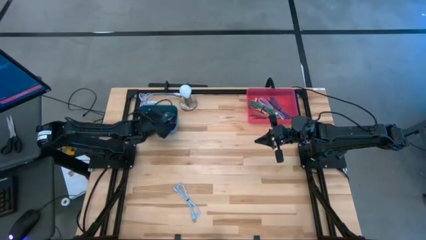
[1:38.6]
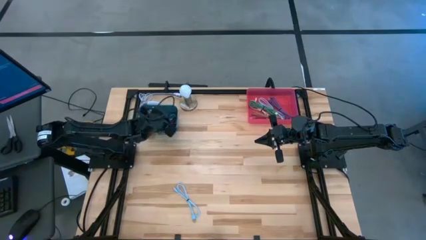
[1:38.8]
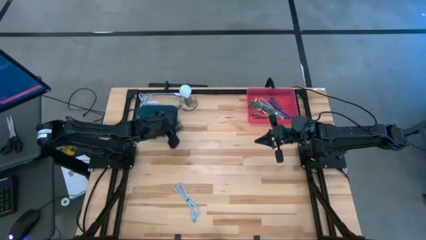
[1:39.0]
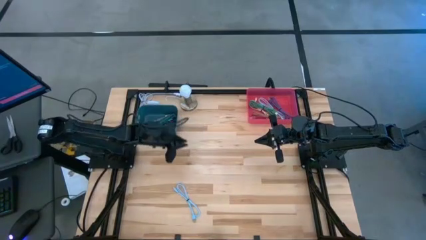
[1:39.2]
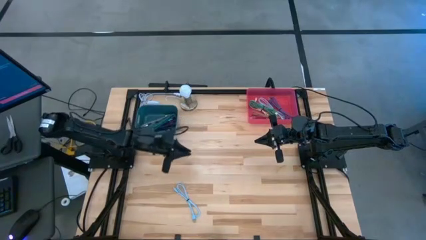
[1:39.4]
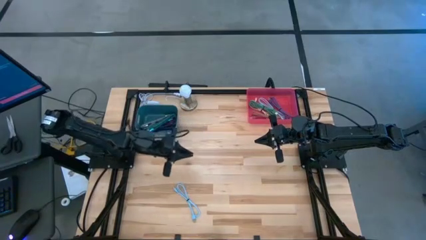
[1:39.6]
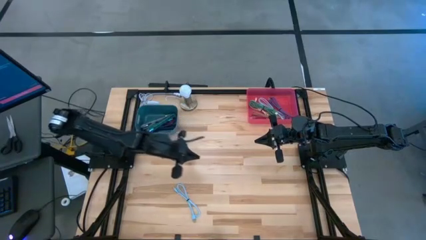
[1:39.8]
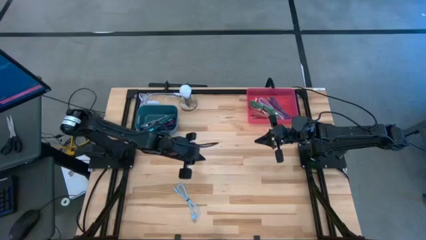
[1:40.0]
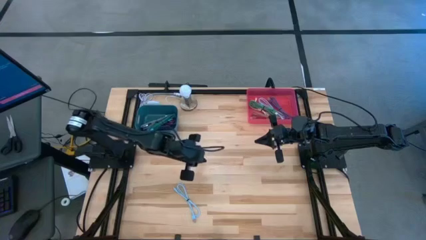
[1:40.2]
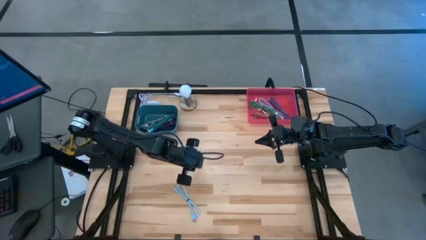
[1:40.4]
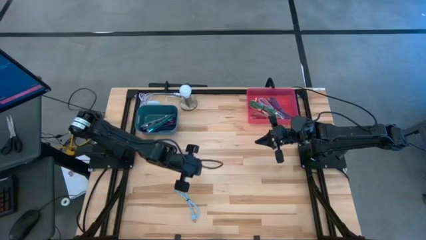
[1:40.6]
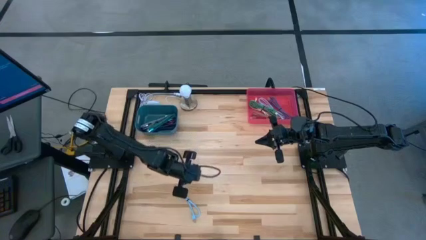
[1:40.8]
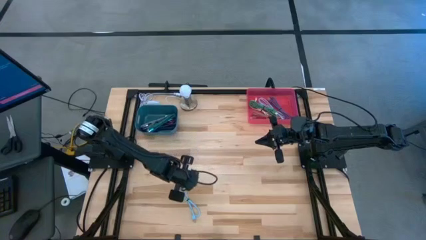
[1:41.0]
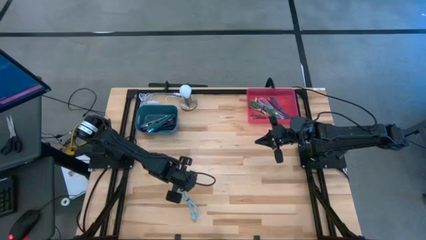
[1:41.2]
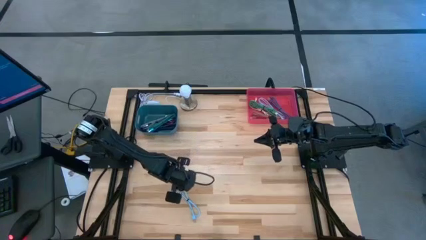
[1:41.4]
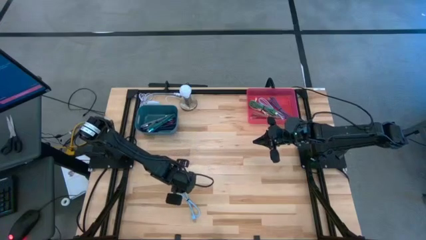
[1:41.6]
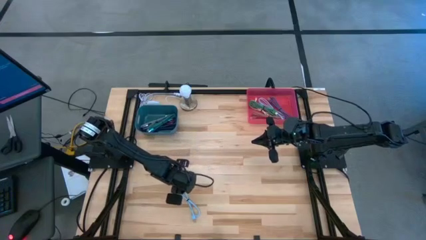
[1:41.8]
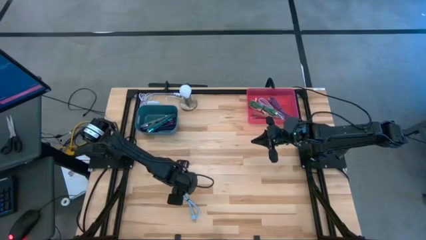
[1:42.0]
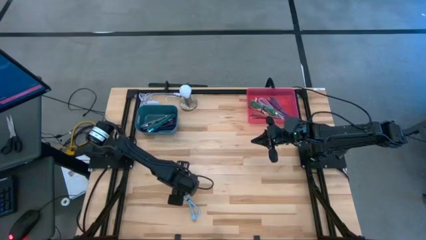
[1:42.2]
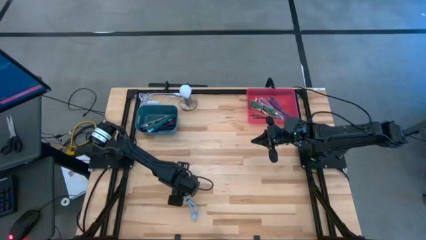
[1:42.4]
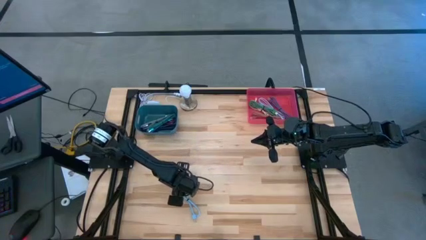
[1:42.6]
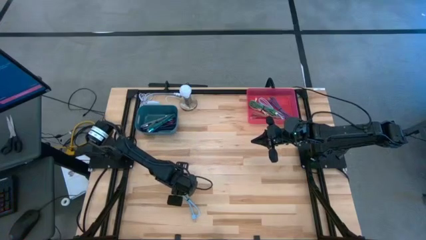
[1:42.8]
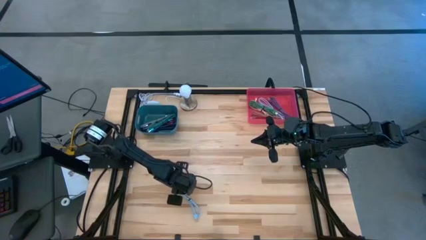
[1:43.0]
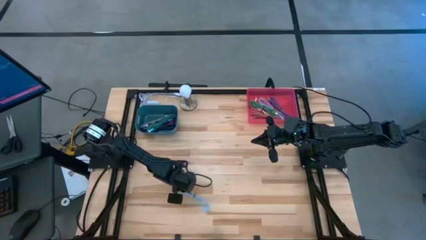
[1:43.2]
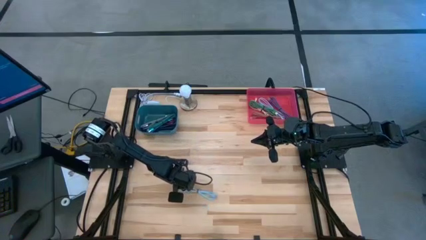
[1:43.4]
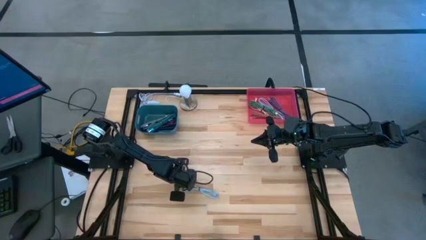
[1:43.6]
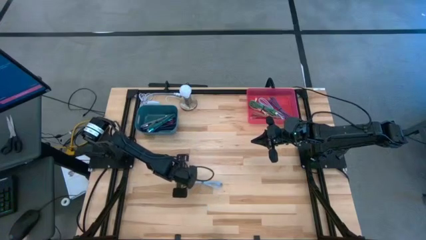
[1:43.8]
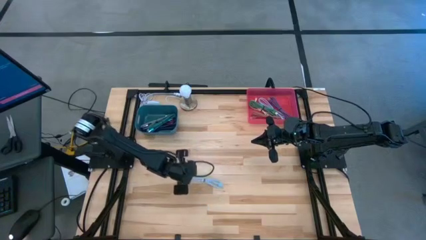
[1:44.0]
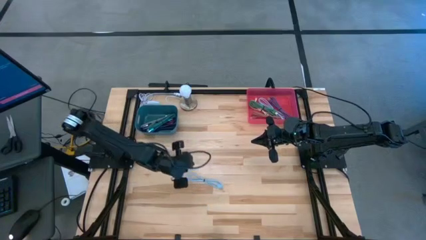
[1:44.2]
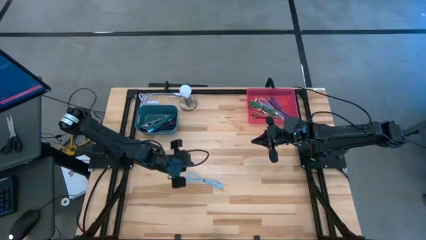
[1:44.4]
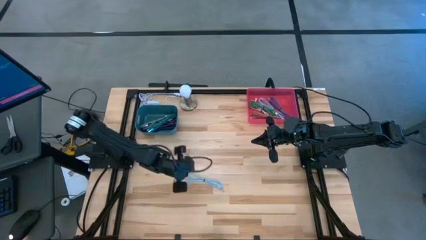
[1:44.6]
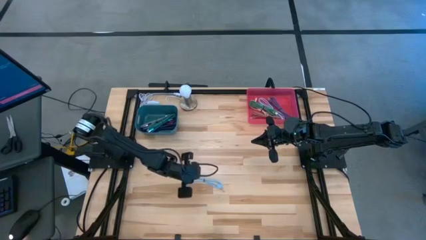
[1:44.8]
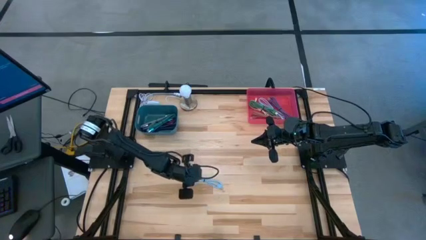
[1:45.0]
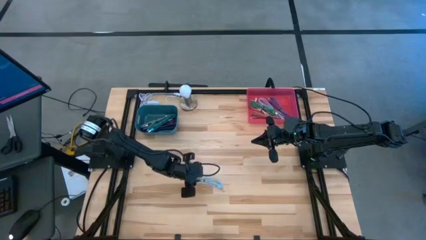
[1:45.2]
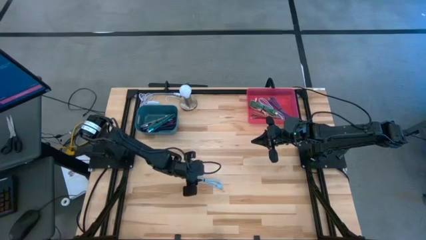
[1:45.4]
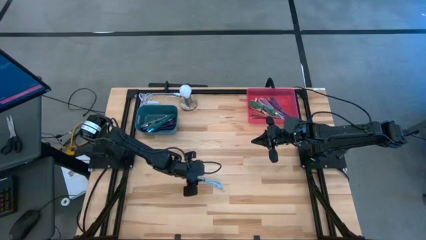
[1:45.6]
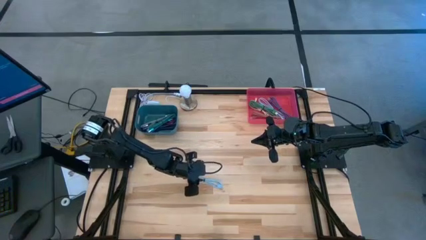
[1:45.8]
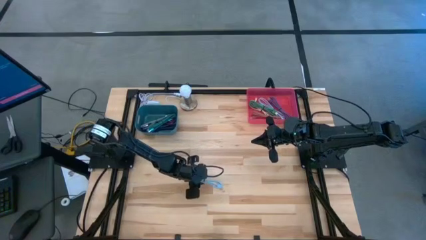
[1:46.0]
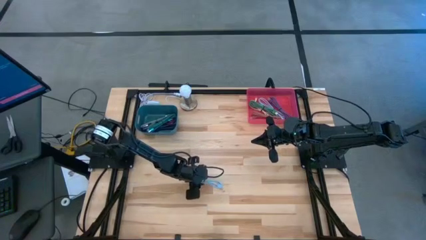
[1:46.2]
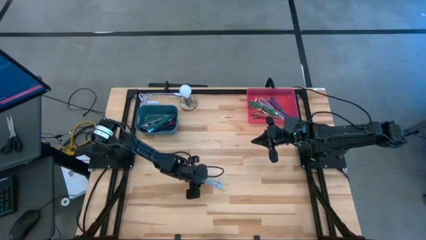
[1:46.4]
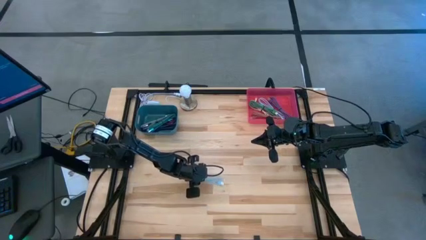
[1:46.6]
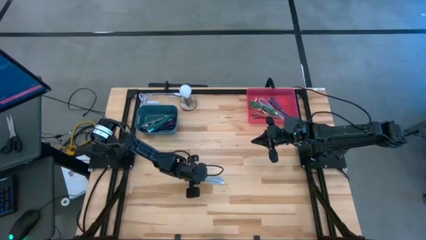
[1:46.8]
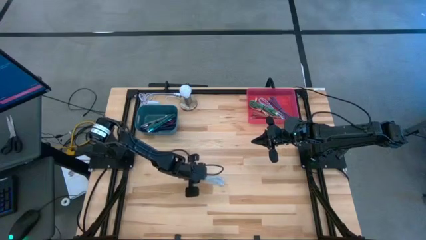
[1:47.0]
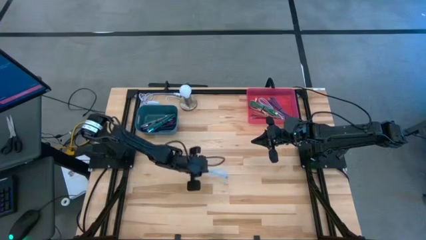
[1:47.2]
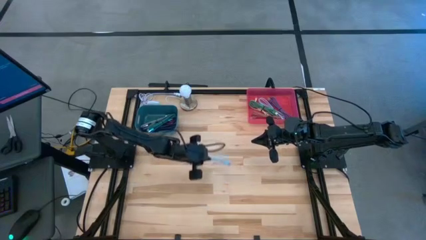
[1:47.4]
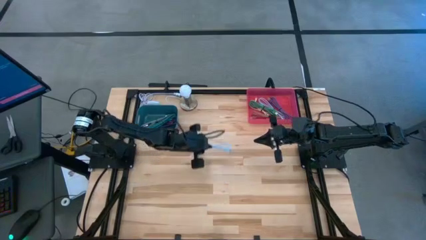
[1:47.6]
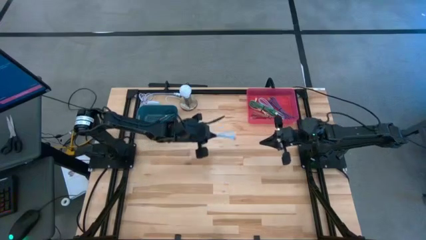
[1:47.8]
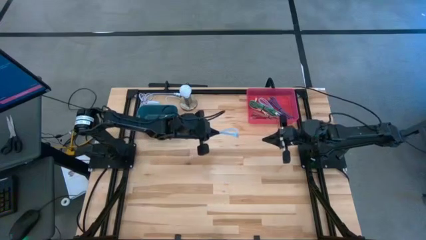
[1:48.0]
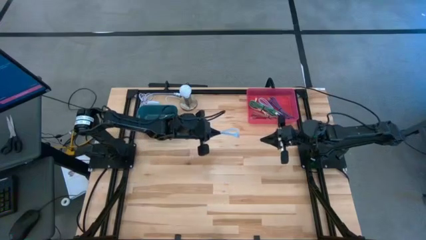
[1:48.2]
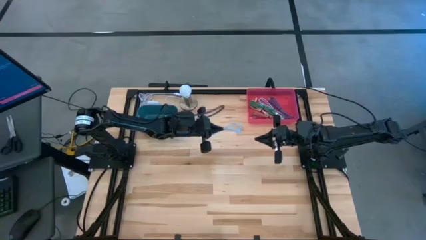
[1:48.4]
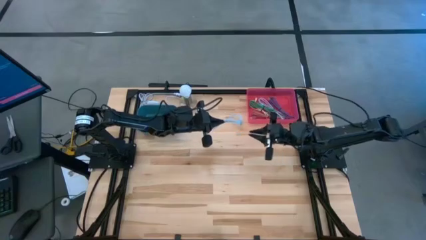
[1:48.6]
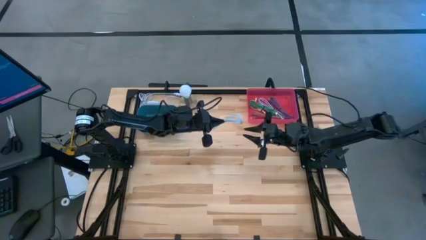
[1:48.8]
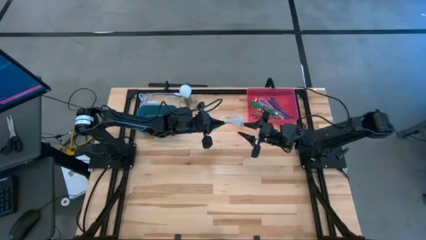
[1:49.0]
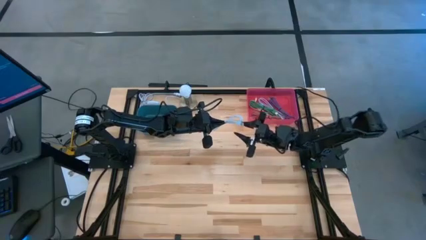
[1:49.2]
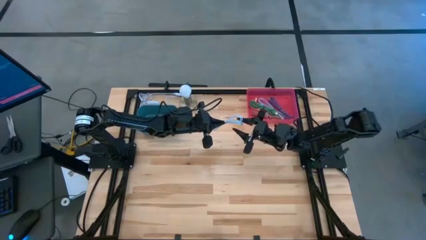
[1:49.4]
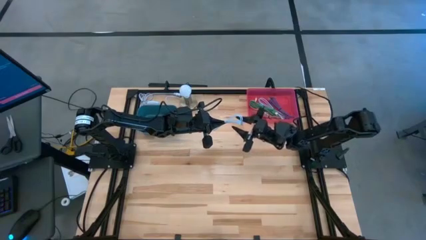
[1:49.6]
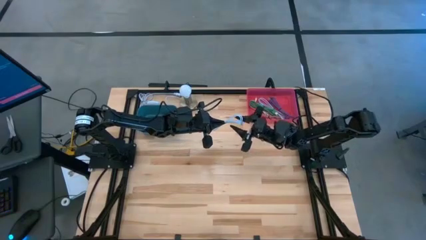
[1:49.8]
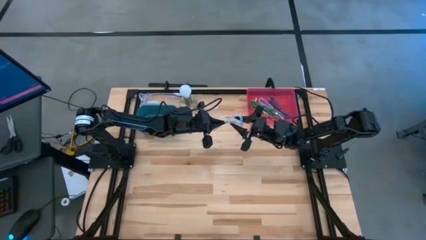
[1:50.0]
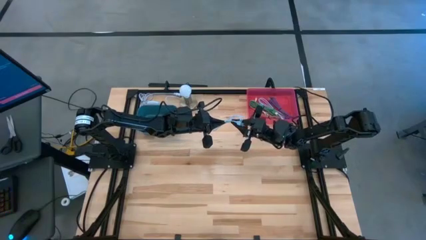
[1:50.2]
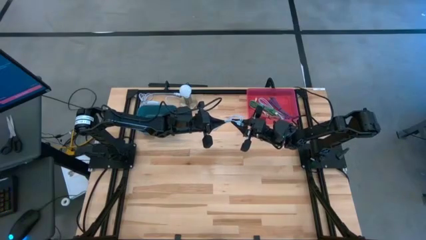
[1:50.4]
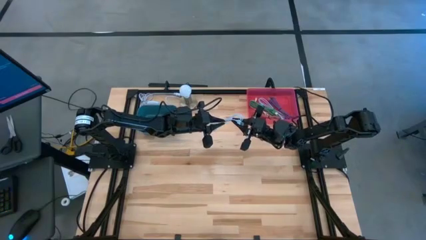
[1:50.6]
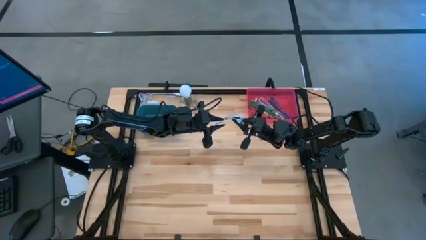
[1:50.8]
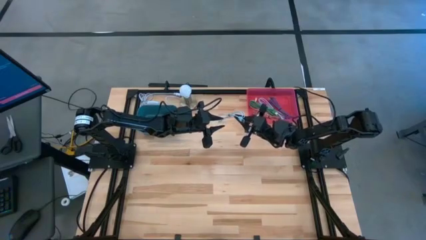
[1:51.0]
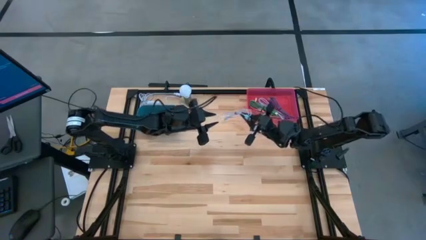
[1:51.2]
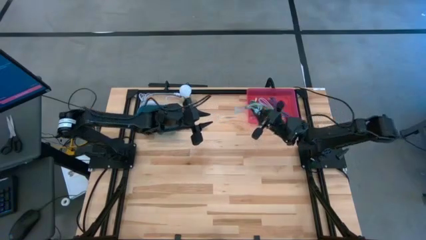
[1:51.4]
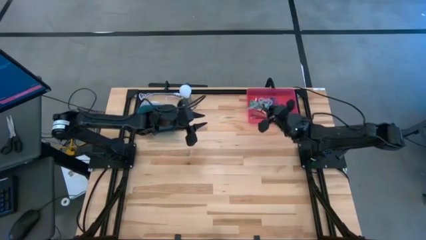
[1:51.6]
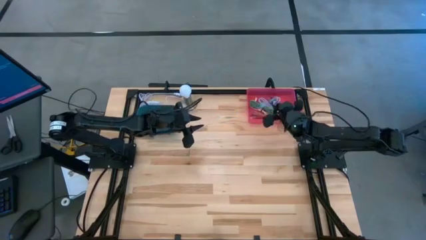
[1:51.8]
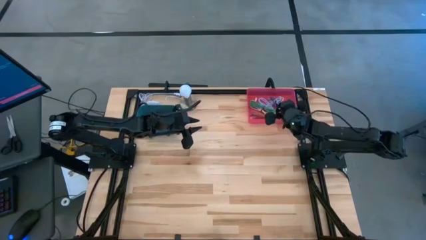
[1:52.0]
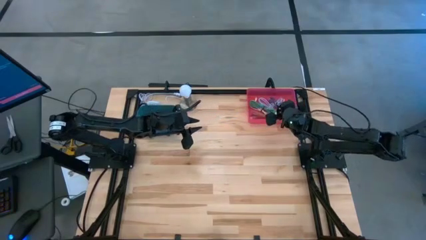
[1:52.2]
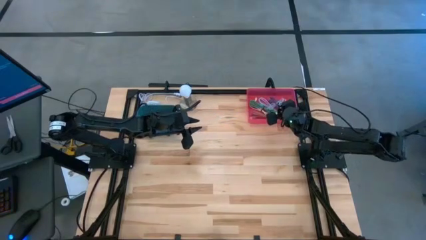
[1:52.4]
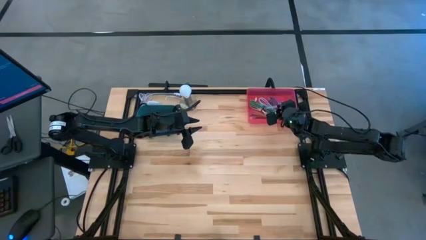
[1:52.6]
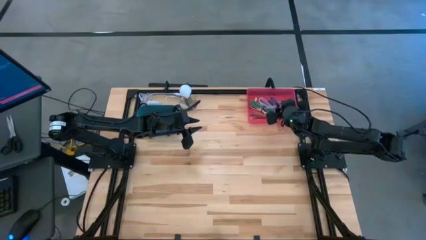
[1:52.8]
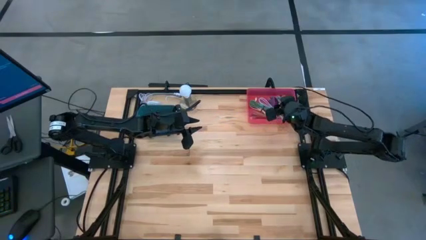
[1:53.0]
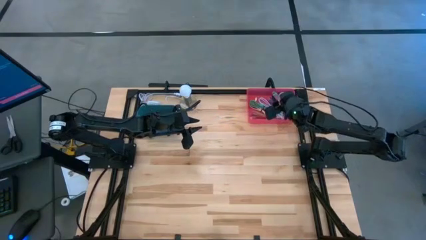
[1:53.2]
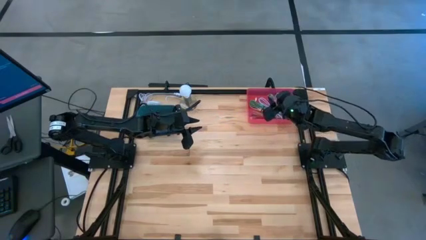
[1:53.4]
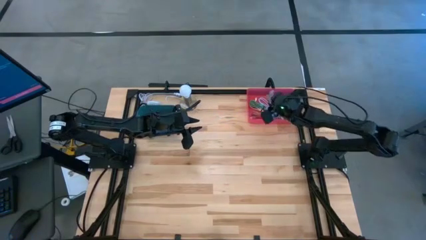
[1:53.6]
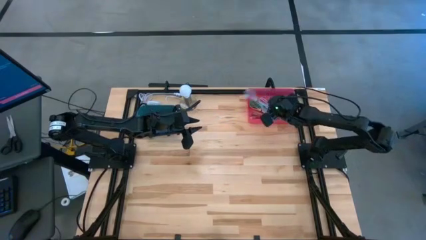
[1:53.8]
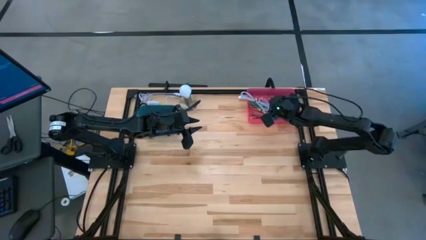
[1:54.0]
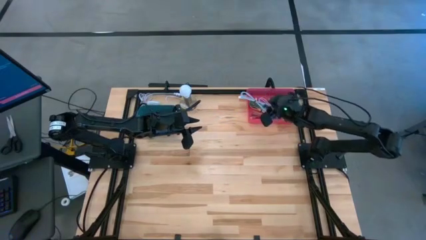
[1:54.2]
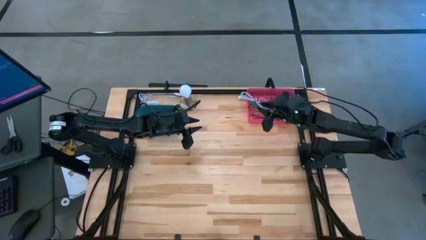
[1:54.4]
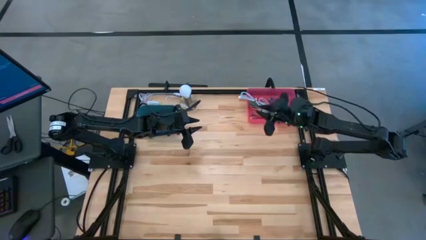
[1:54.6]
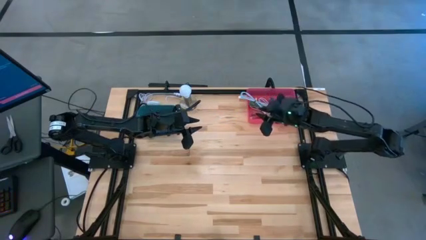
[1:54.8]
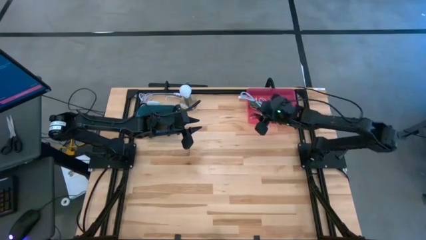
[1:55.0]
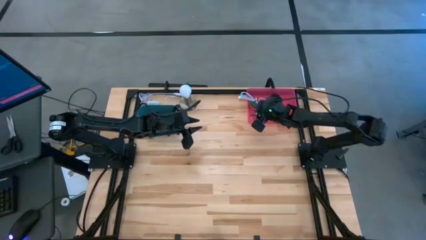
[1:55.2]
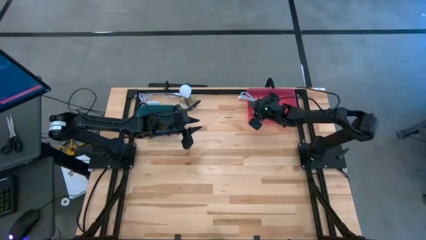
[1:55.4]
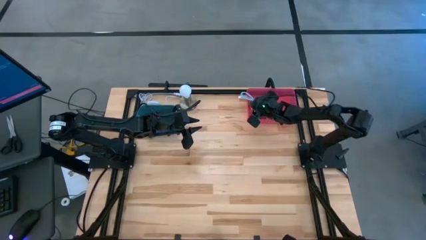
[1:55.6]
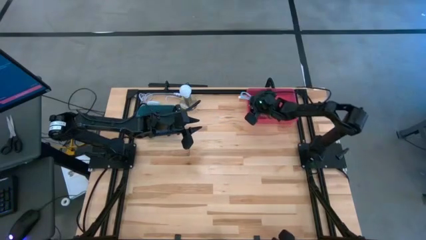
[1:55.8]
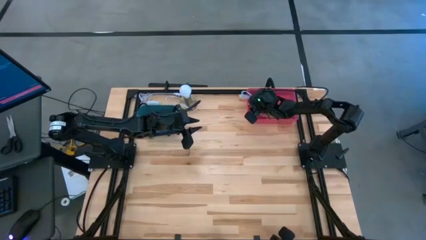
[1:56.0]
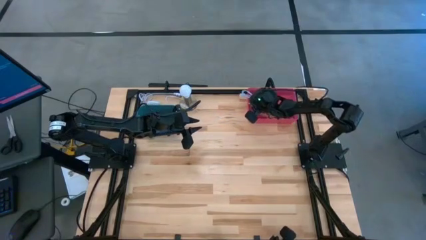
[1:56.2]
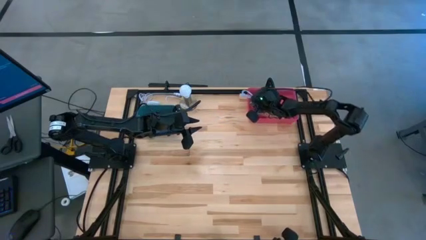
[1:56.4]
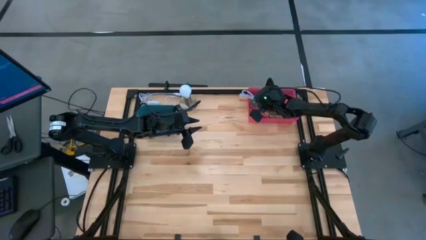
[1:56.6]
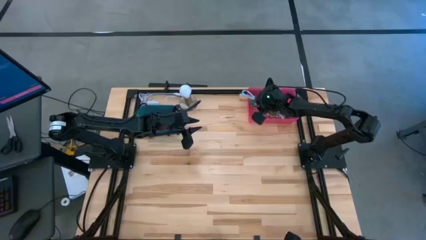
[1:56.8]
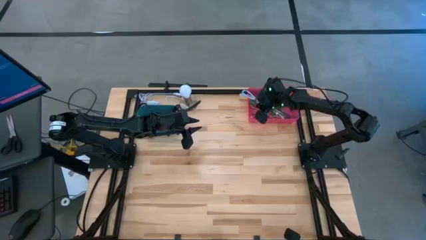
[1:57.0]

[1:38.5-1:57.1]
Task: Pick & Place USB Port
Put the plain light blue charger cable into the pink bin
